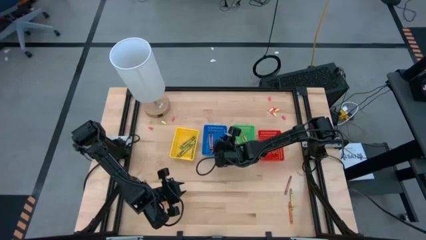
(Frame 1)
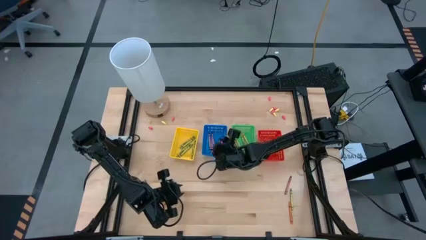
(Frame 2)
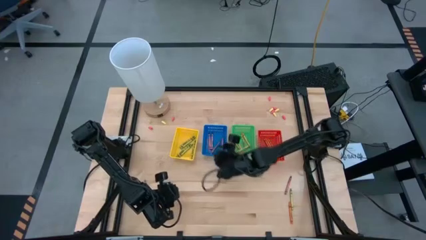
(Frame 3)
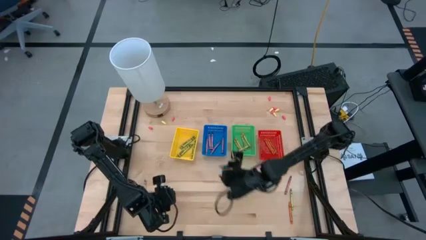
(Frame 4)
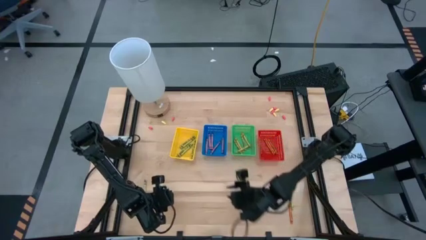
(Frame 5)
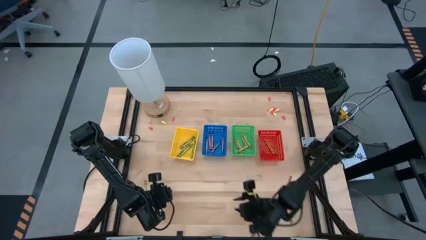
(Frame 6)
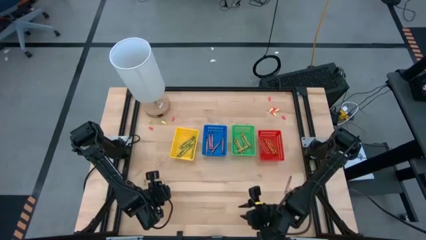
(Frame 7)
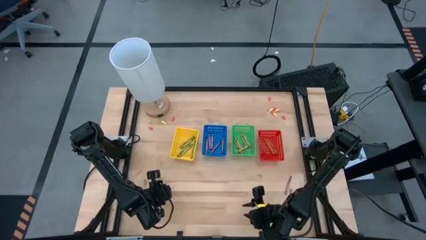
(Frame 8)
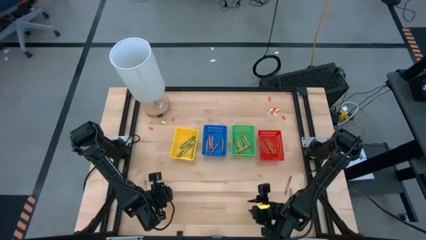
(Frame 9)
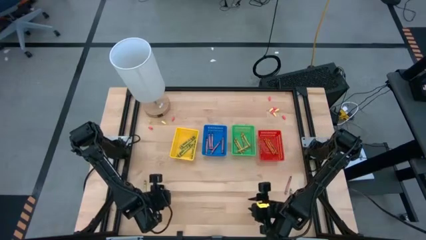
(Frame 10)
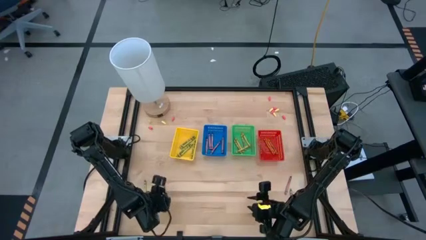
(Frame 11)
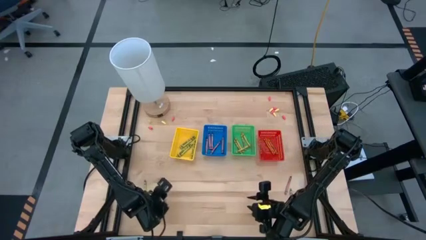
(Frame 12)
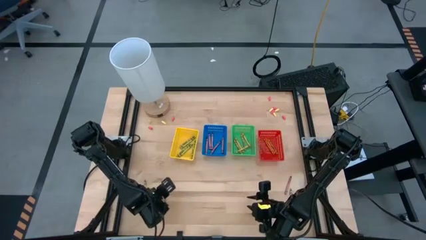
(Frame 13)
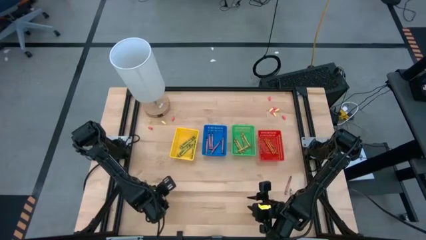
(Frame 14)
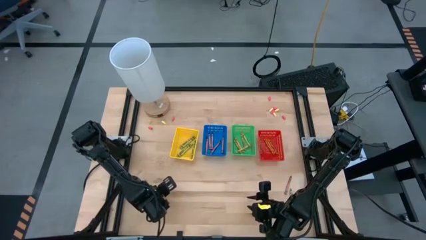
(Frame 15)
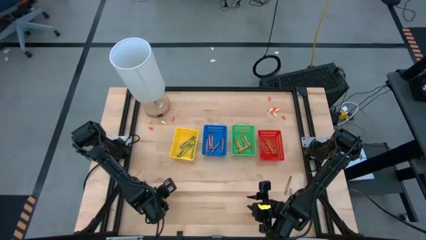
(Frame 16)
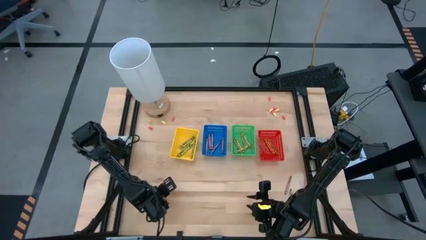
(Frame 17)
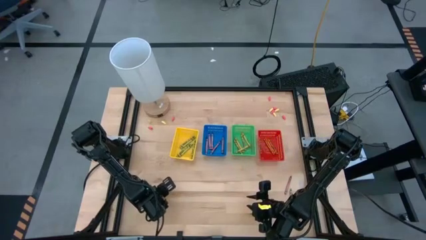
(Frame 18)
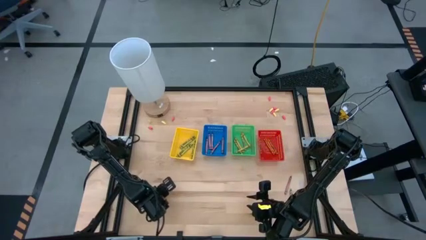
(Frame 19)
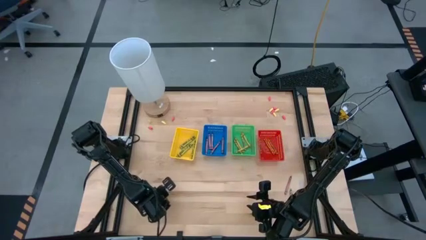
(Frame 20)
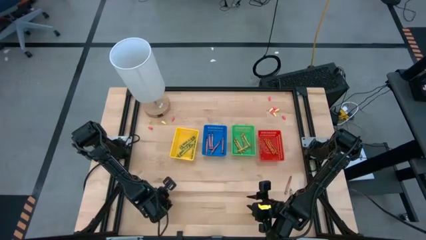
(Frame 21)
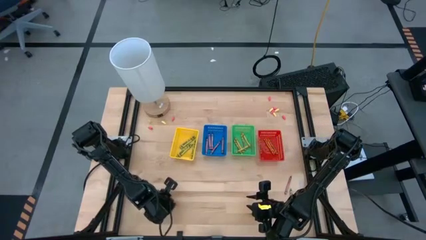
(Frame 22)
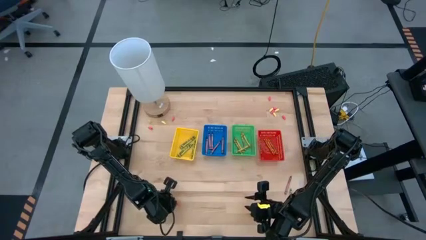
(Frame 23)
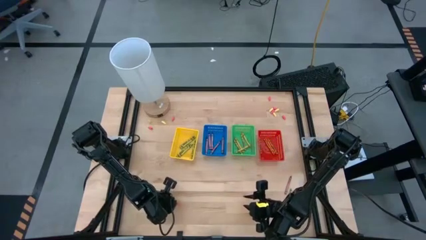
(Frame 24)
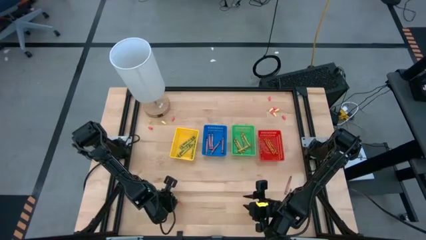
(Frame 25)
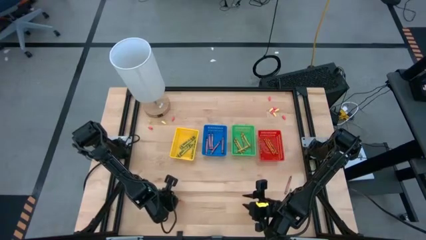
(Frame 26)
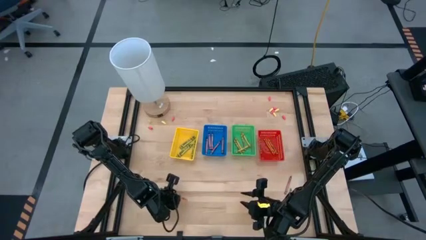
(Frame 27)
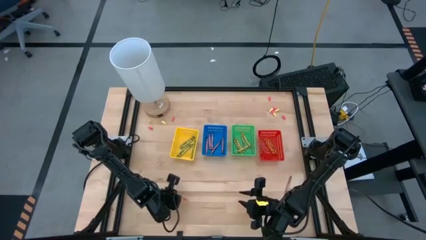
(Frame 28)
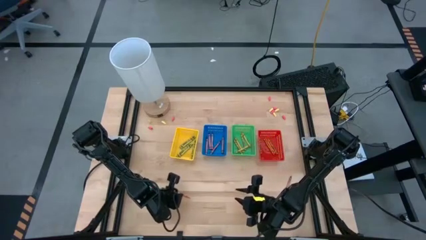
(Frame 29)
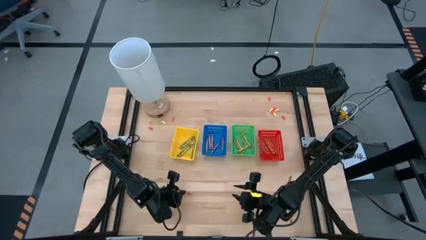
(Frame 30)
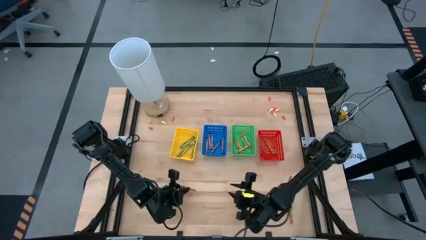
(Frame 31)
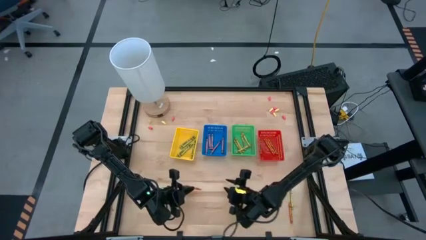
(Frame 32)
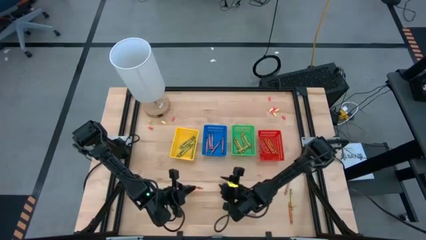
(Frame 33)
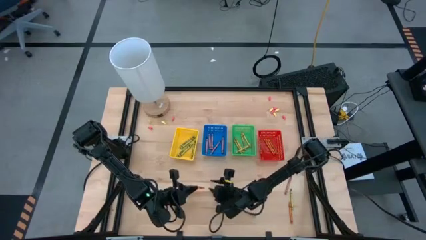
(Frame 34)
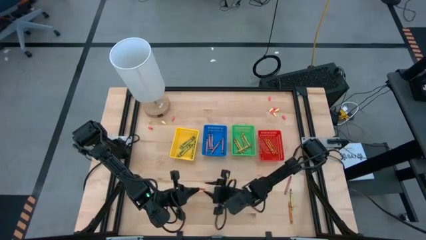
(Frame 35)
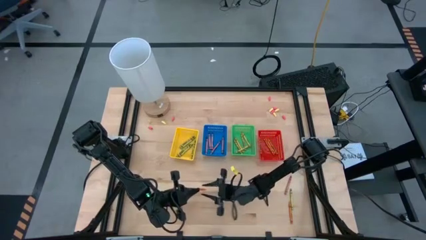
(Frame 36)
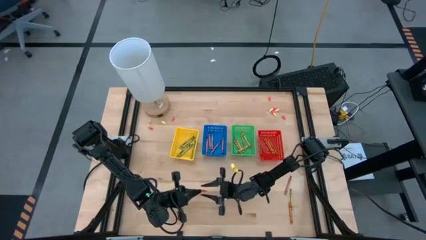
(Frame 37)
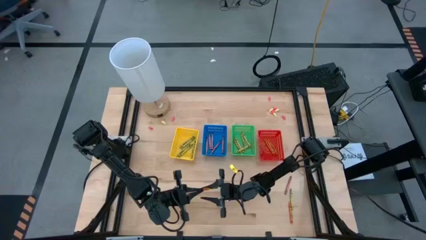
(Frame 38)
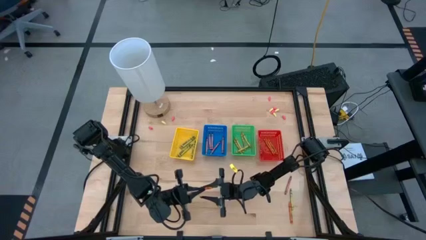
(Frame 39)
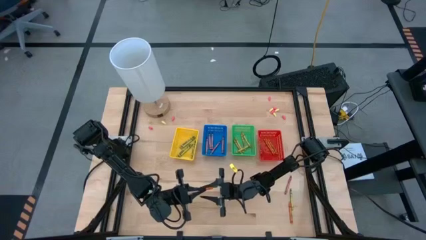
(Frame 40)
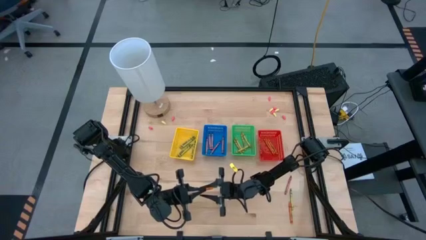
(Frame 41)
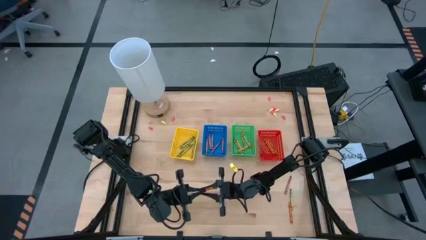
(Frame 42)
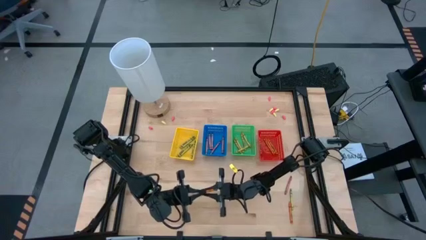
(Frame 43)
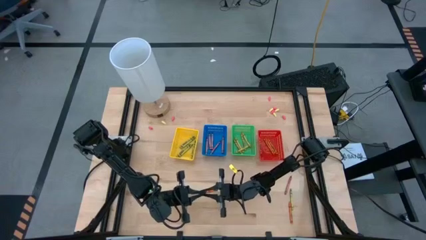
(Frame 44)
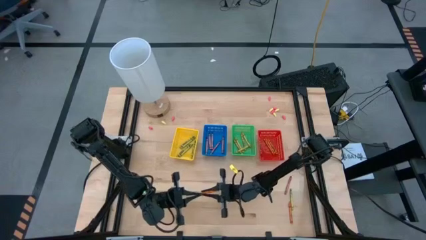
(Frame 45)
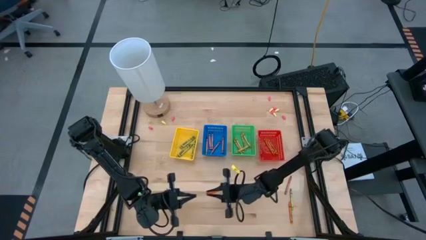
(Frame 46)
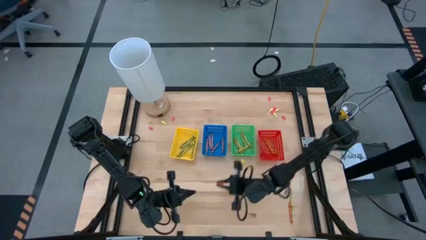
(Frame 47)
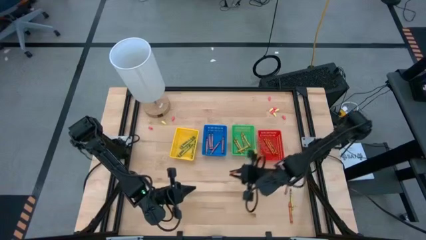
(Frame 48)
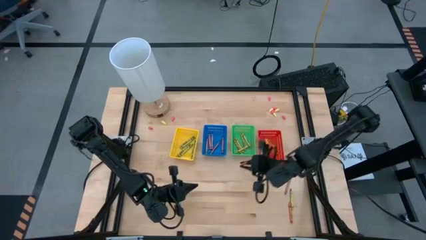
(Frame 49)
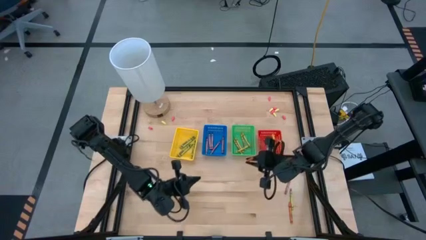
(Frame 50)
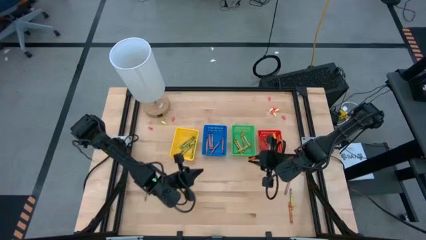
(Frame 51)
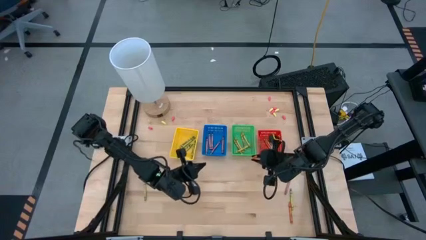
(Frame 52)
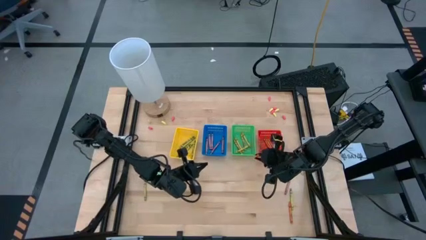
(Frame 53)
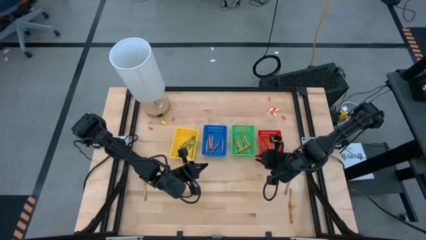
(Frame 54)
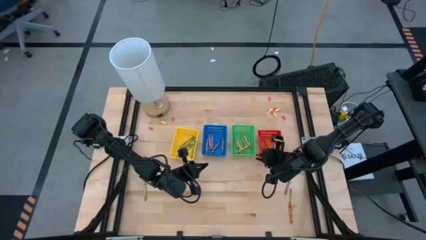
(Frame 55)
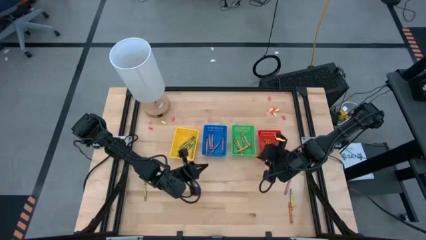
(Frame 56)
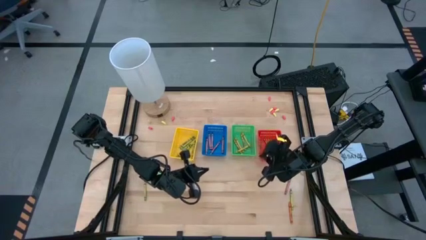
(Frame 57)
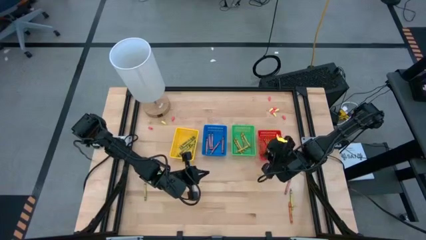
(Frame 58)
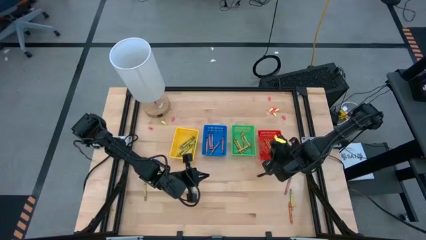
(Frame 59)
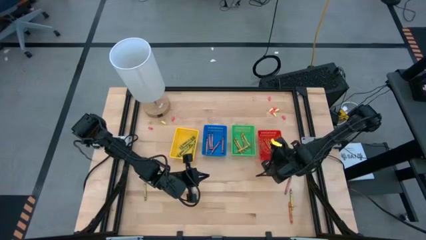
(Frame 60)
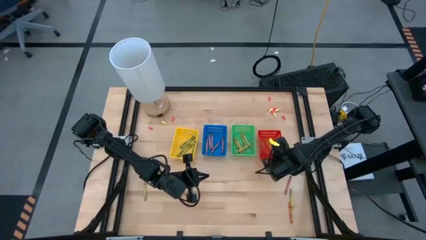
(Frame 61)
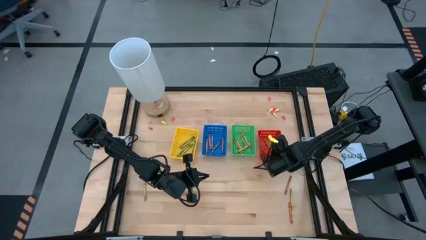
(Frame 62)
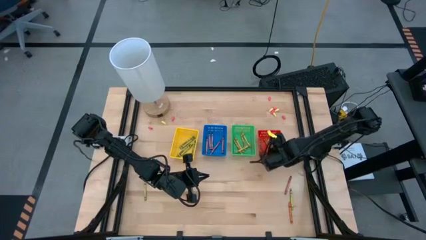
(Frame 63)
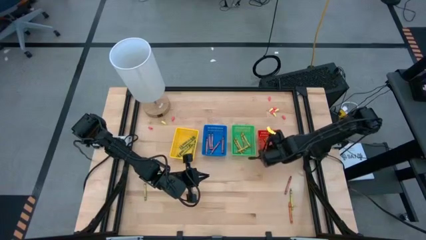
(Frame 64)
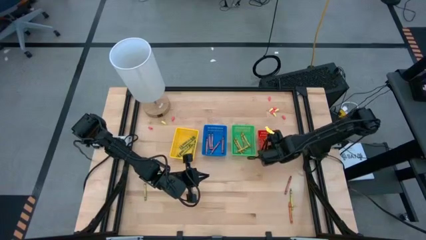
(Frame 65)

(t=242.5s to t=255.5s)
Task: Sort crayons
Put the orange crayon into the red bin

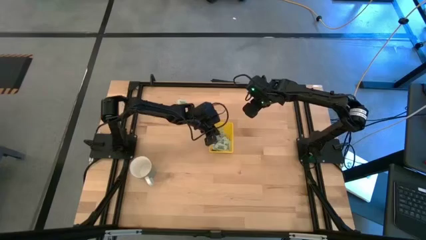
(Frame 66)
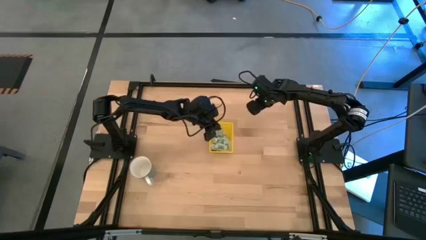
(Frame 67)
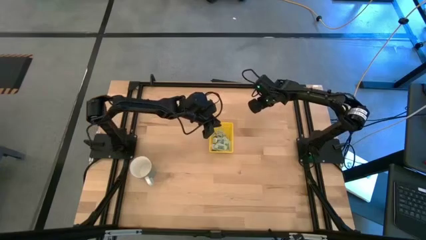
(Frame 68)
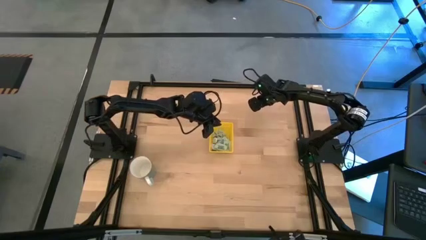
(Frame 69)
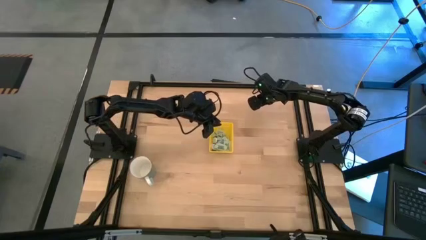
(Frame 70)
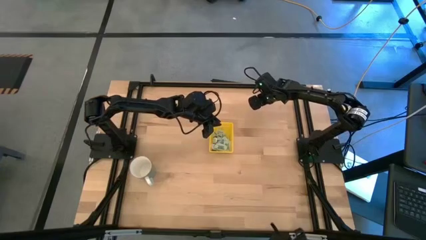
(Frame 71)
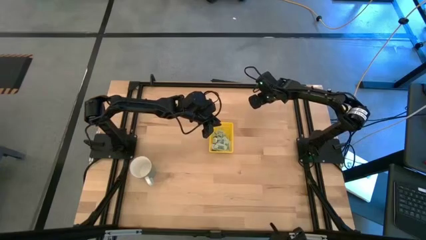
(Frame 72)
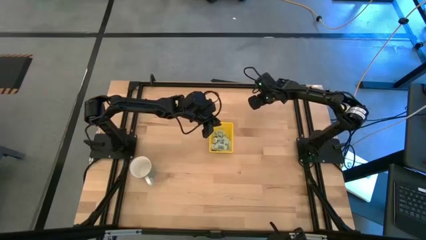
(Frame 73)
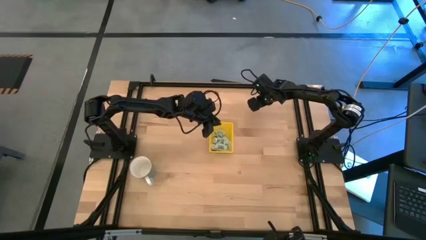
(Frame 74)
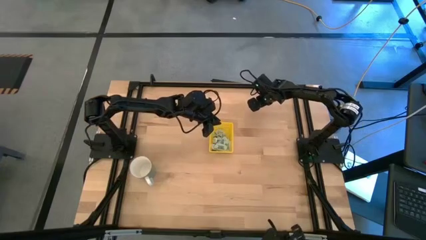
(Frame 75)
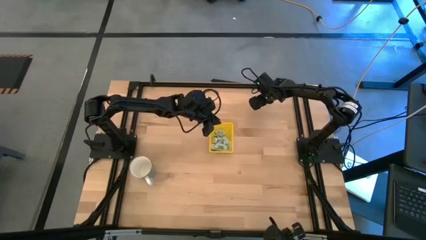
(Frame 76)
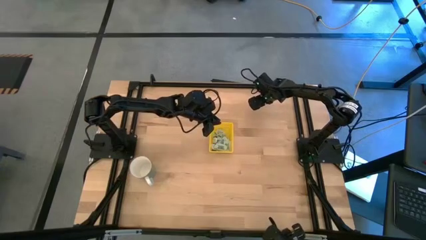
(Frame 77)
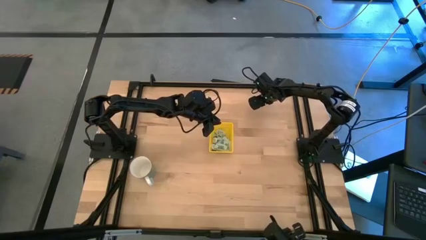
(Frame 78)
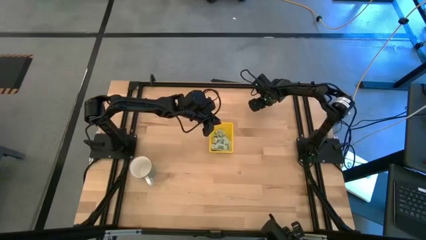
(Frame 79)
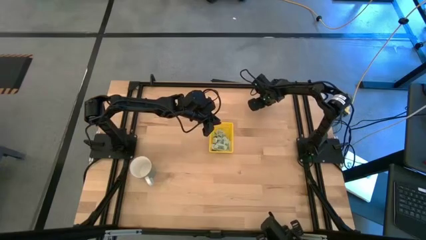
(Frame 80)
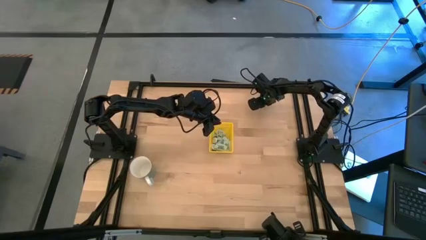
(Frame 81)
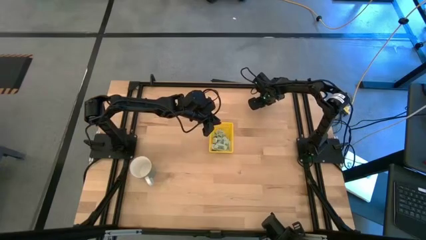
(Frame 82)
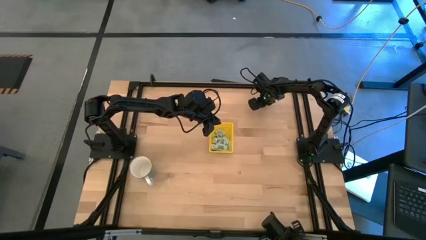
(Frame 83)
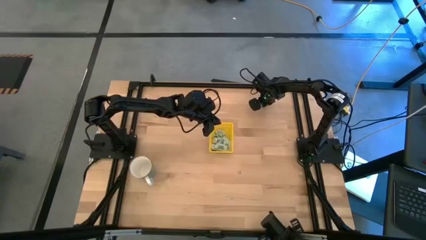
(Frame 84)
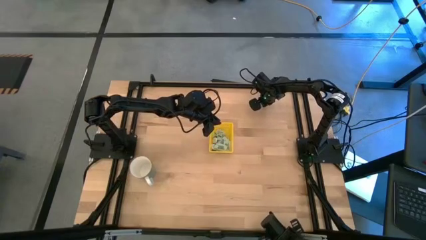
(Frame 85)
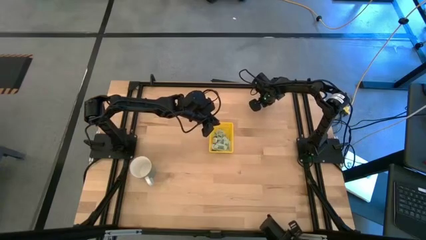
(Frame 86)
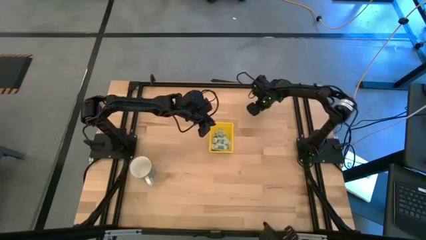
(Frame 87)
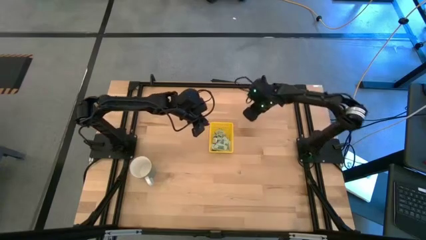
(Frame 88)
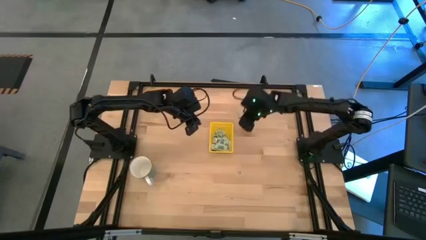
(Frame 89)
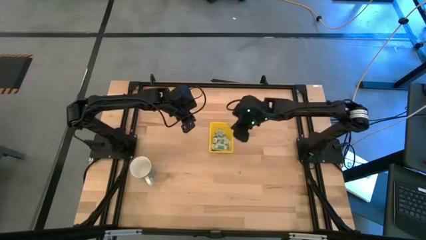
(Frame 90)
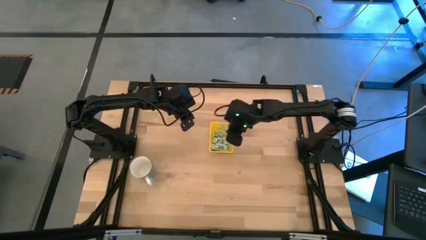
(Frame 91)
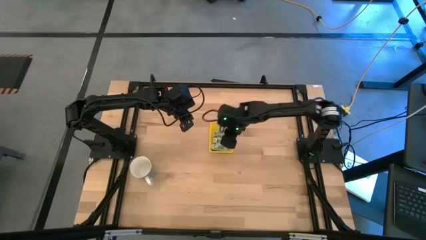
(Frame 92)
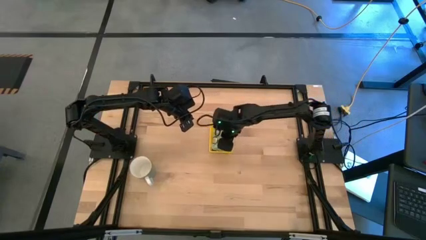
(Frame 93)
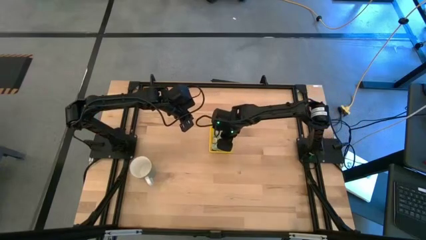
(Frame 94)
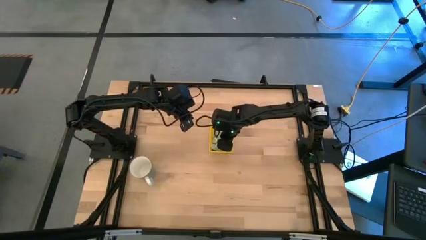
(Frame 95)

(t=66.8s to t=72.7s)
Task: Pick and place Stevia / Truvia into bins
Put the right white stevia packet into the yellow bin
